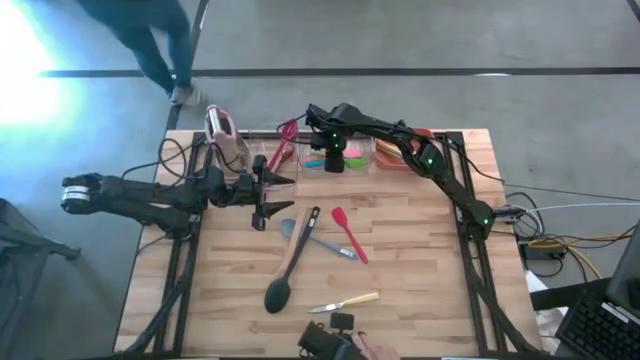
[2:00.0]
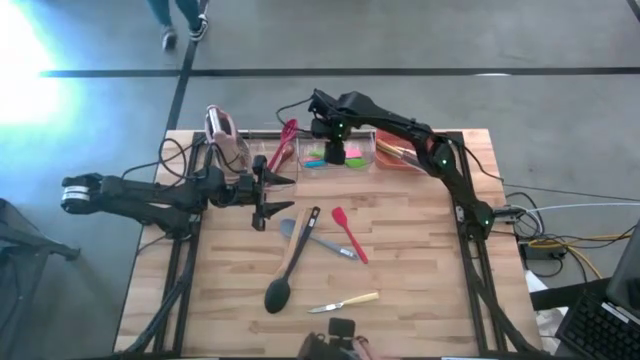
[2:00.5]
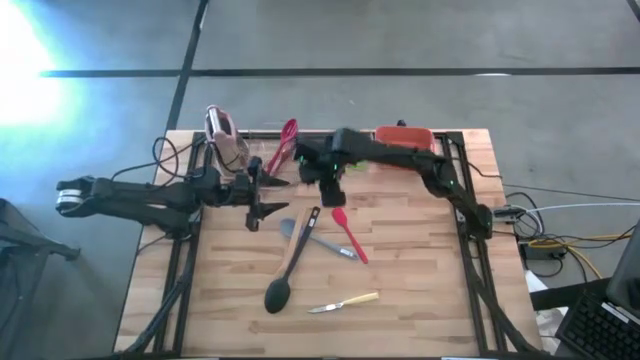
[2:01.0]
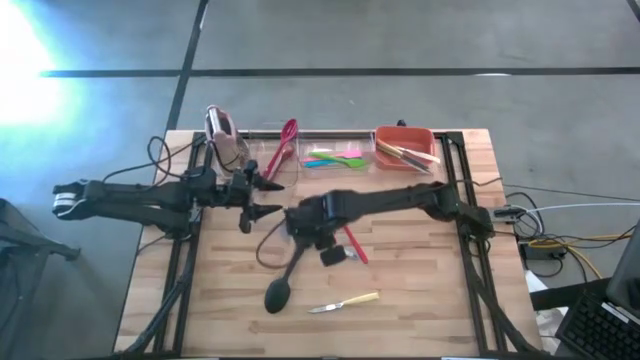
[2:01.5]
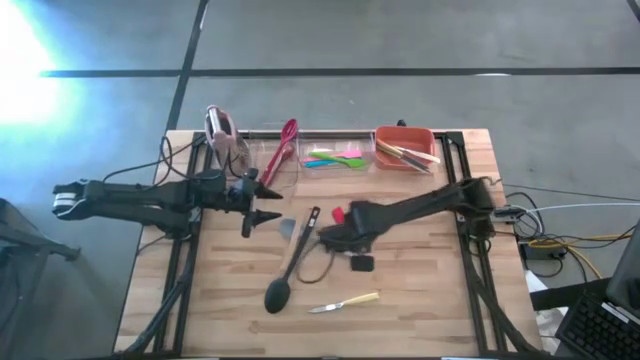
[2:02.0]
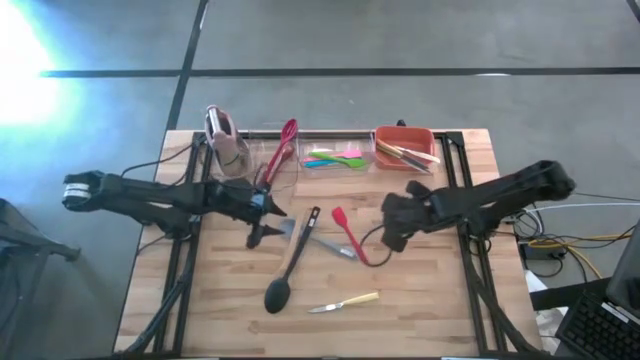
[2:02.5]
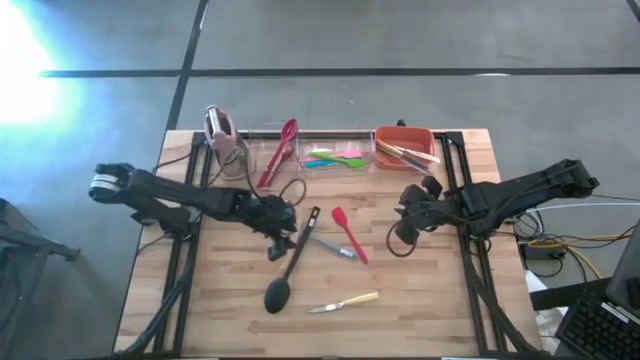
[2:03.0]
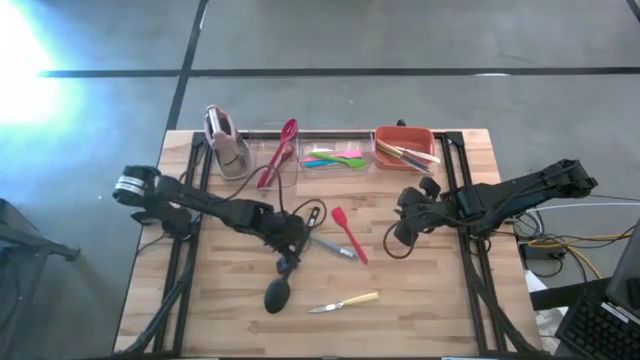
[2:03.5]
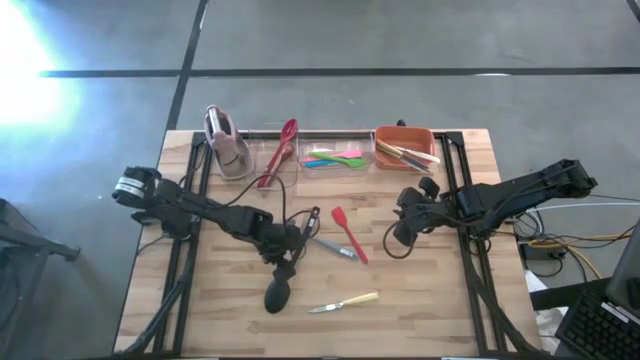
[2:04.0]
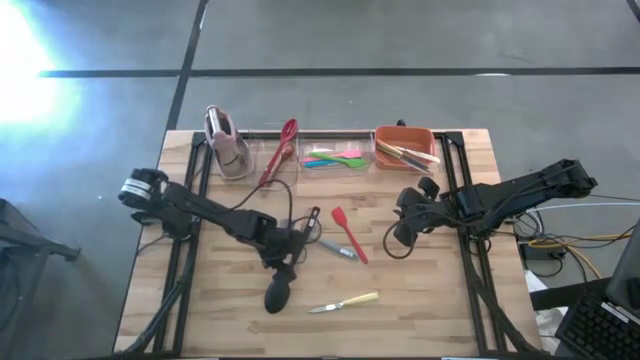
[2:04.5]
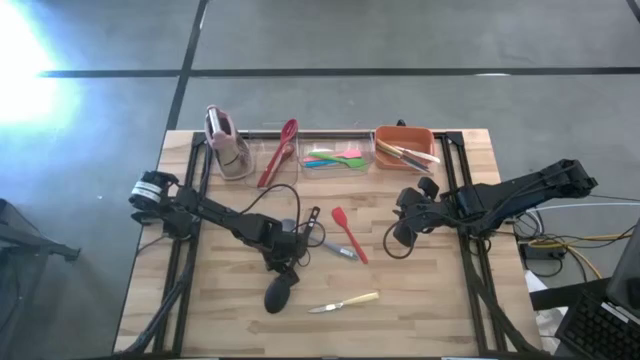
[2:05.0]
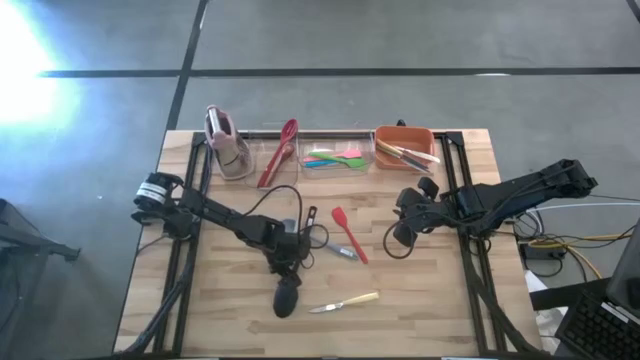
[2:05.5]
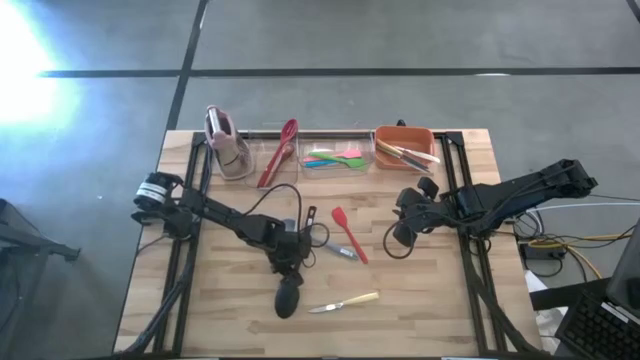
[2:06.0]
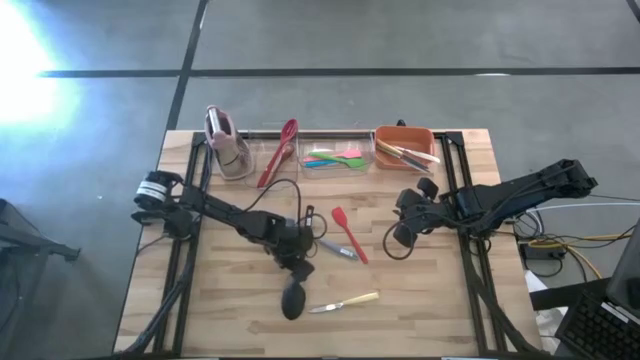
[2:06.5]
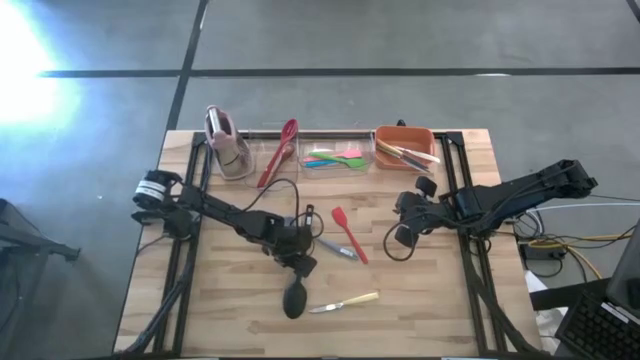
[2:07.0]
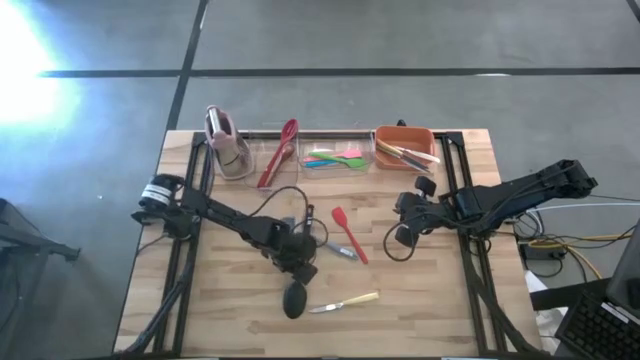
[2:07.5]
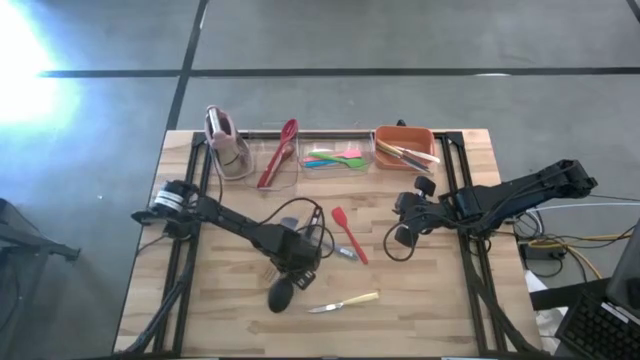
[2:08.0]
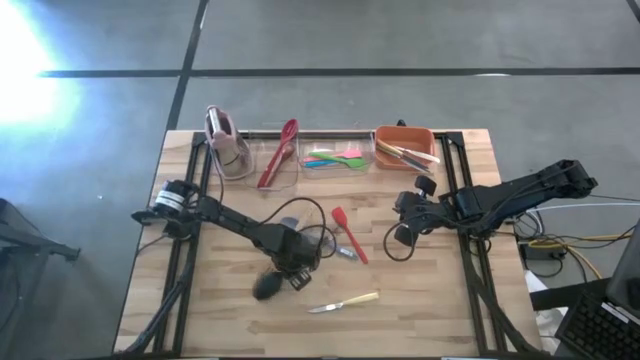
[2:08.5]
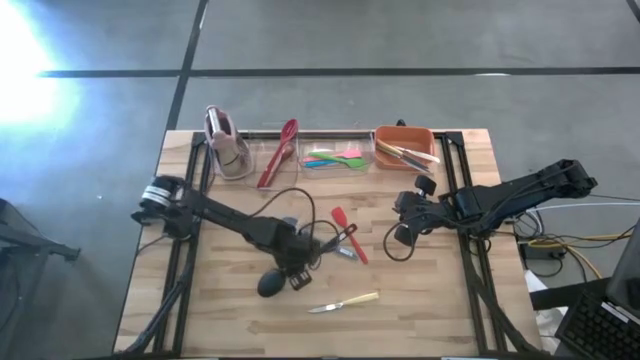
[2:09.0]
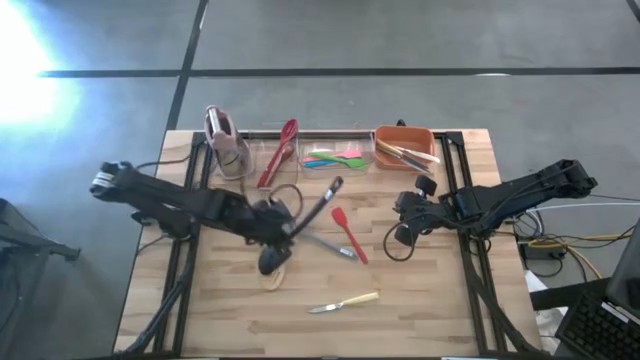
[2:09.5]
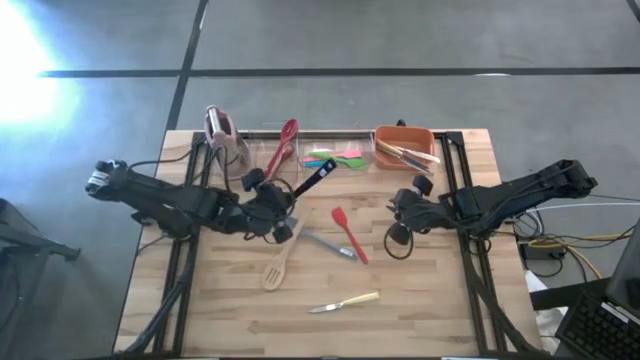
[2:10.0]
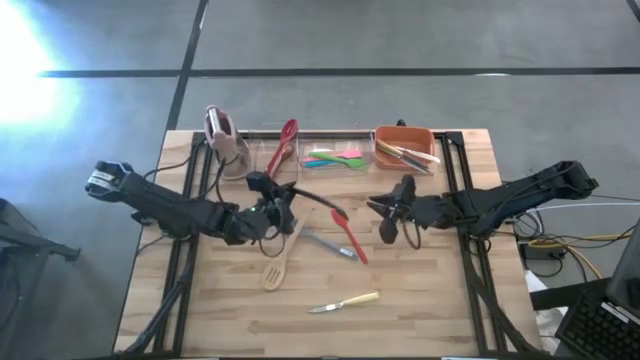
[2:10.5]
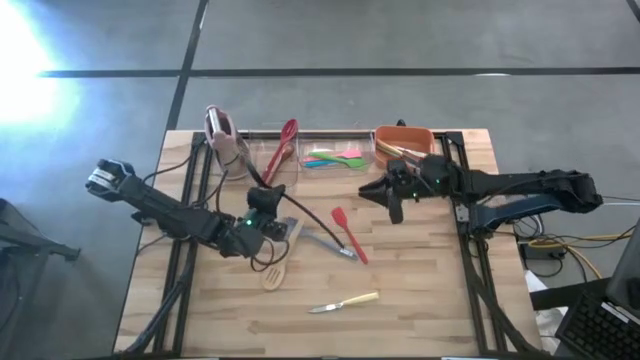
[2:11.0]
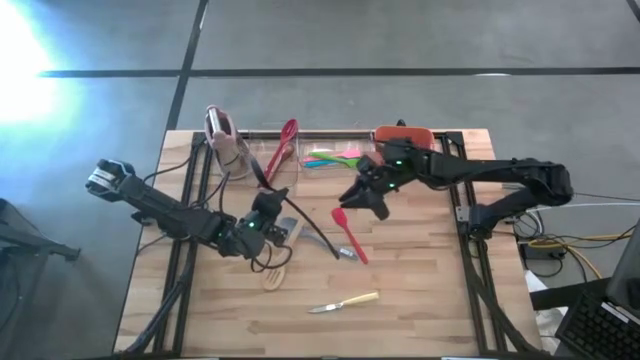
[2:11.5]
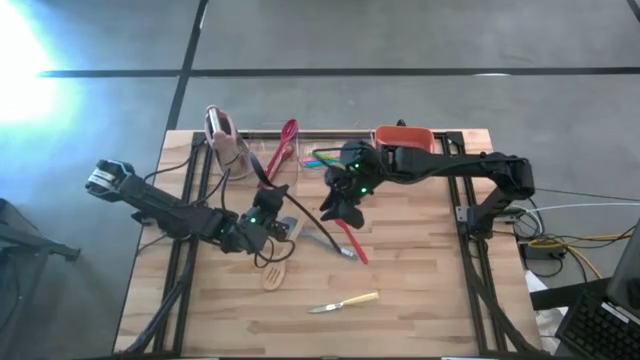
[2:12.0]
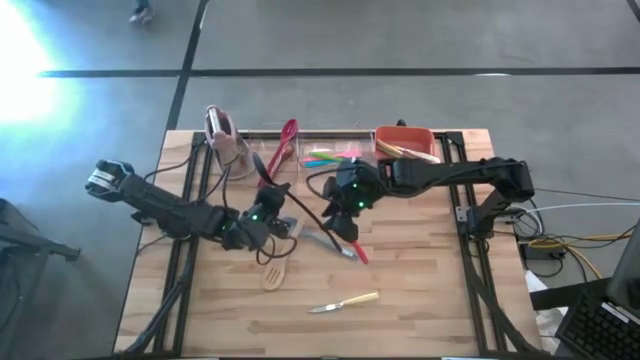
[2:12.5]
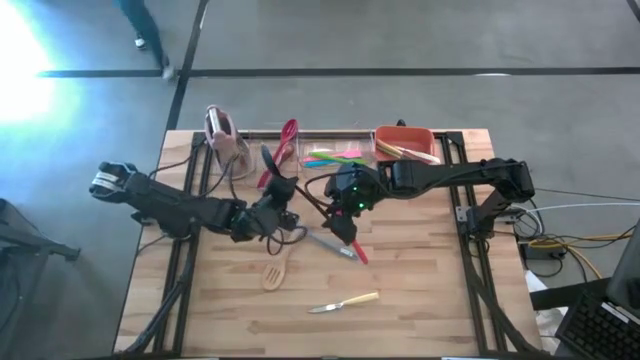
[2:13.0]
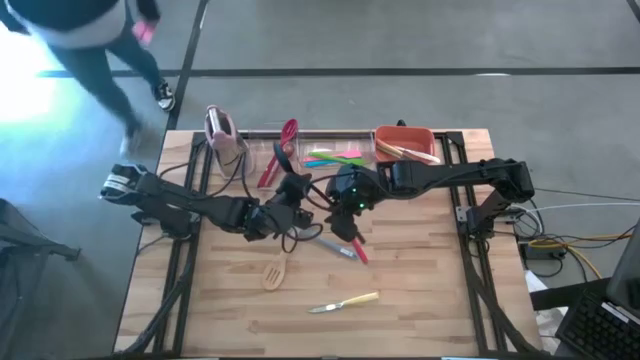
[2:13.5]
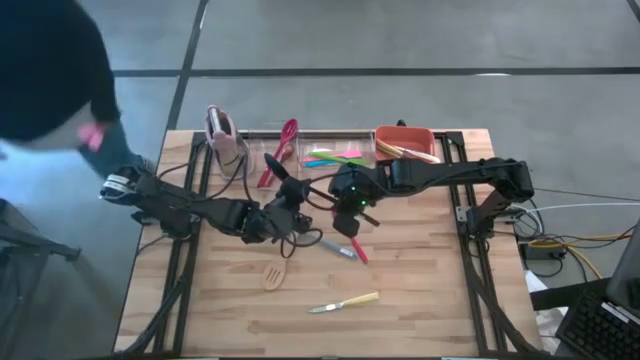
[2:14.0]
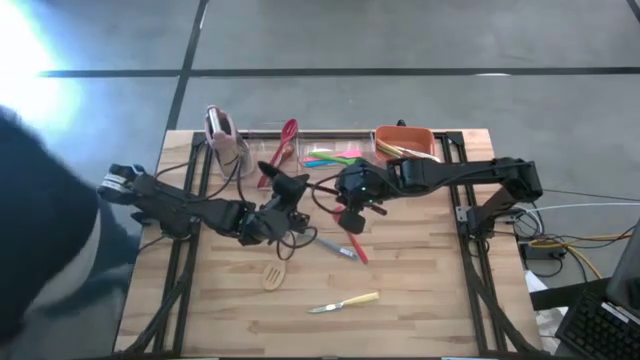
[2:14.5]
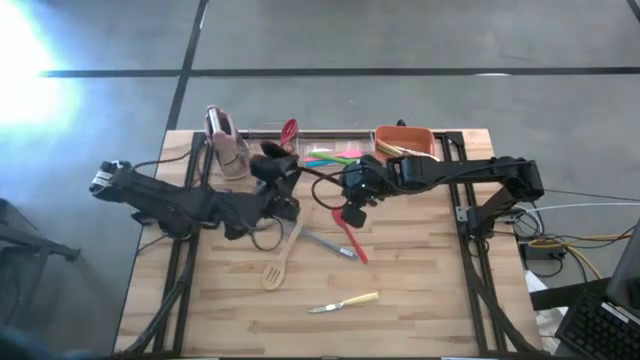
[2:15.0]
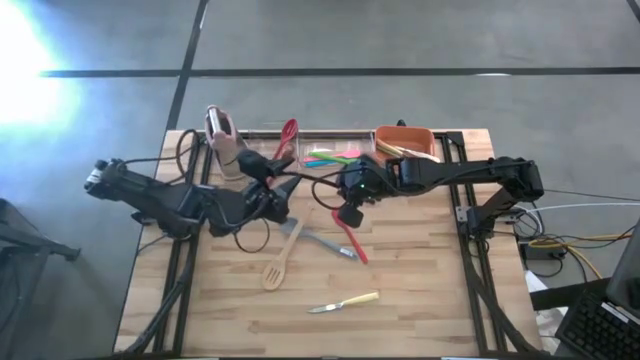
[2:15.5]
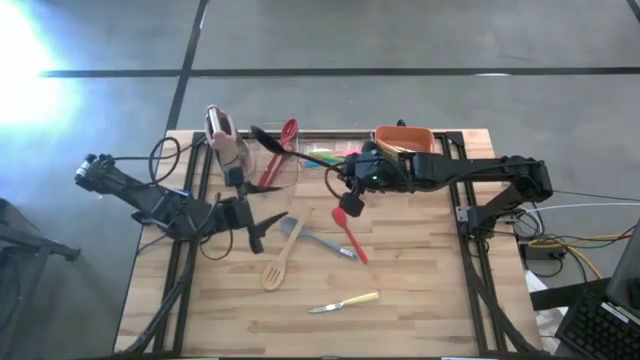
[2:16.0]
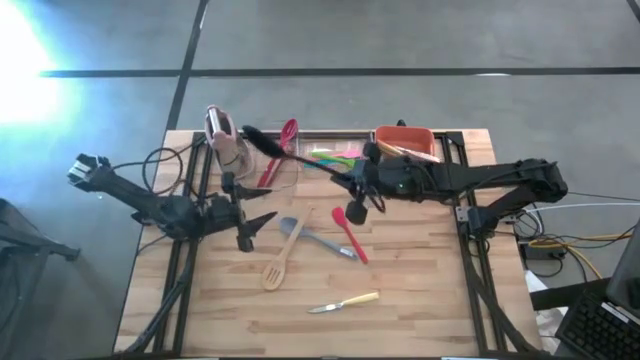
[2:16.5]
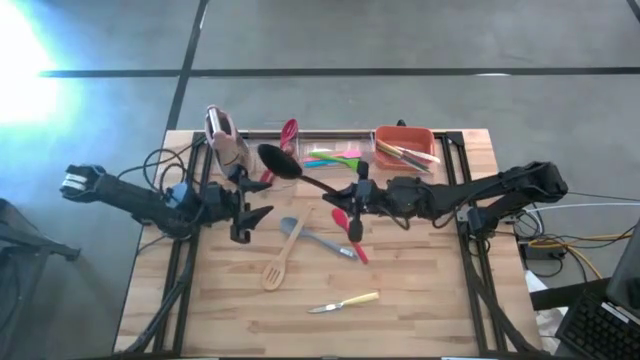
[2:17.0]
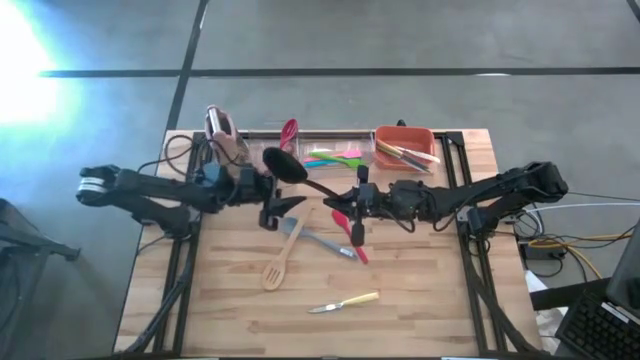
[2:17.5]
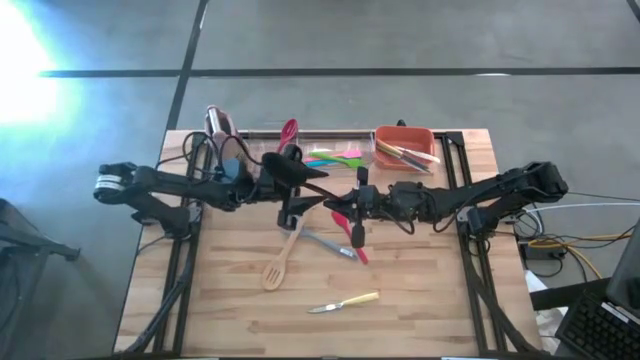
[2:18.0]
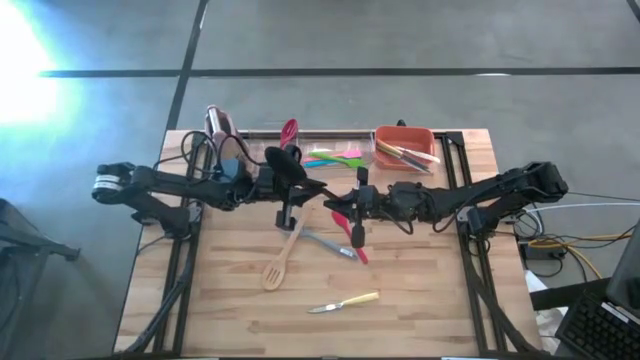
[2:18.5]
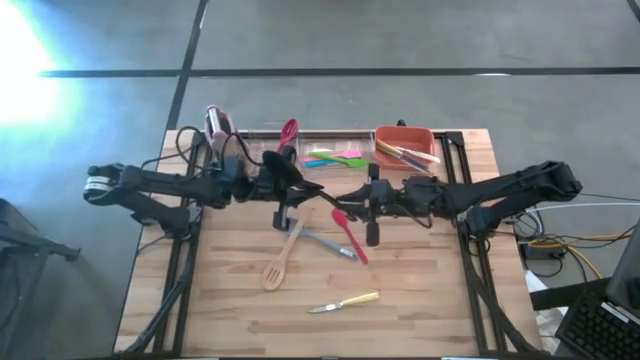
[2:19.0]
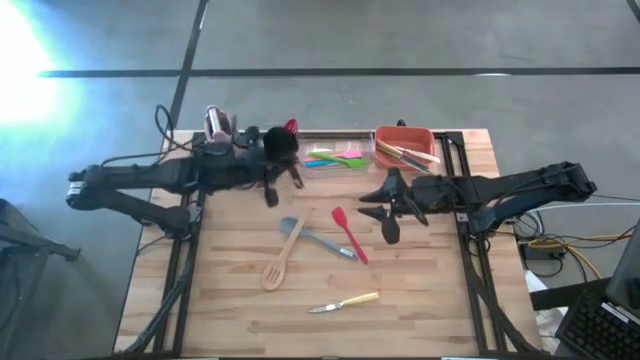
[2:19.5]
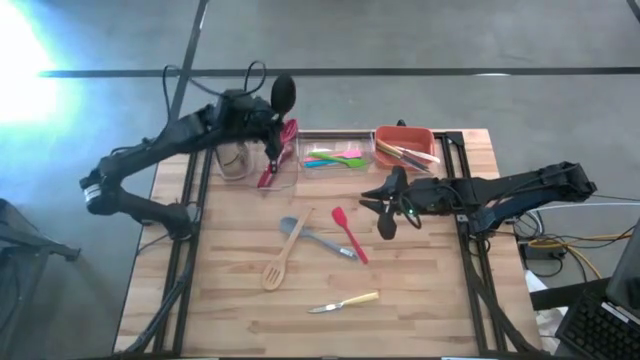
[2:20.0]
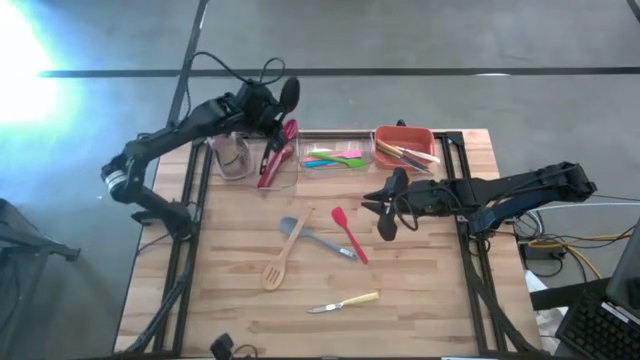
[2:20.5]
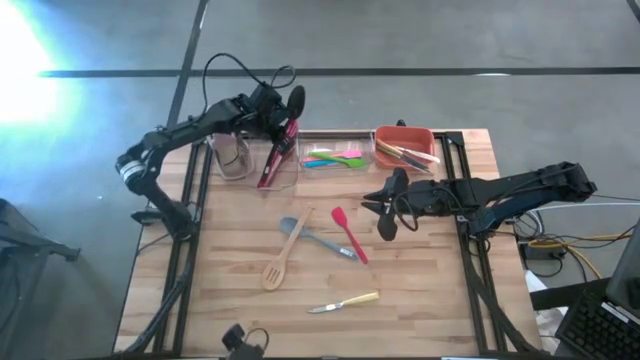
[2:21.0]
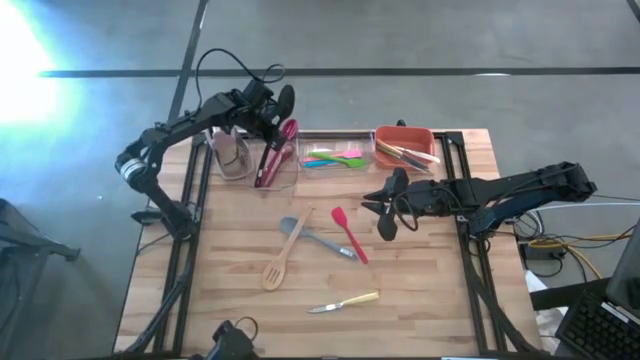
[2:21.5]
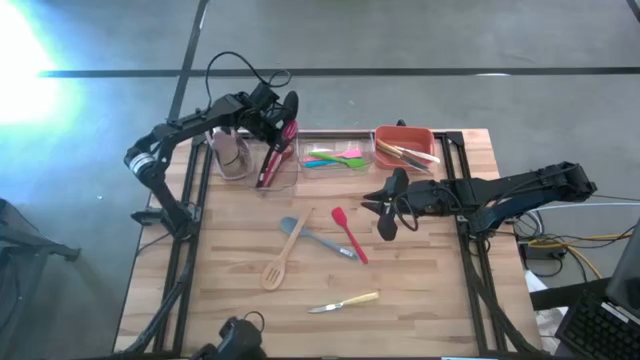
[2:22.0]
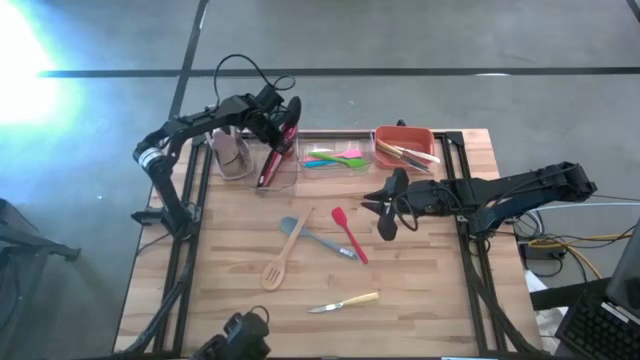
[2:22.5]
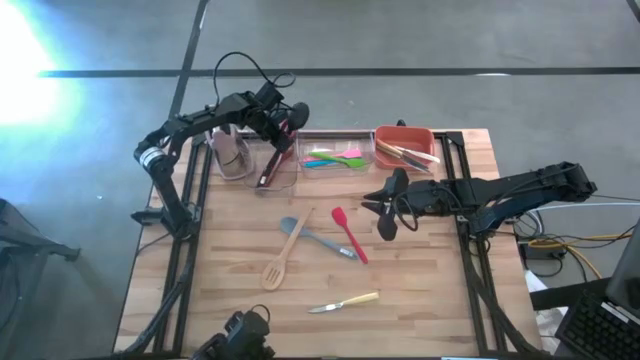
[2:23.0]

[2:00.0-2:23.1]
Task: Pick & Place Kitchen Items
Put the black serving spoon into the left transparent bin
